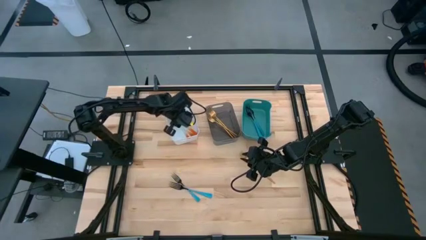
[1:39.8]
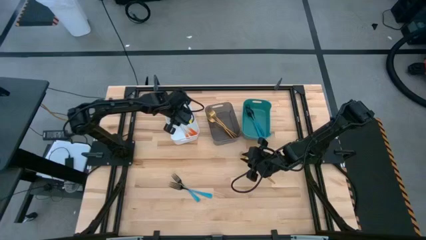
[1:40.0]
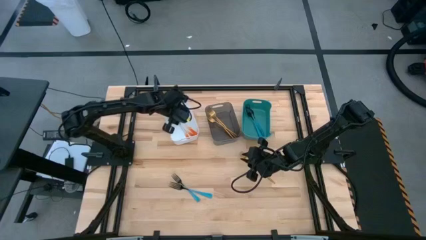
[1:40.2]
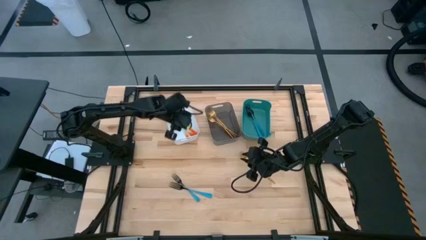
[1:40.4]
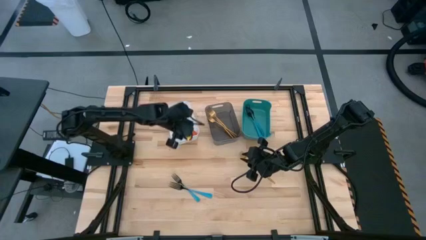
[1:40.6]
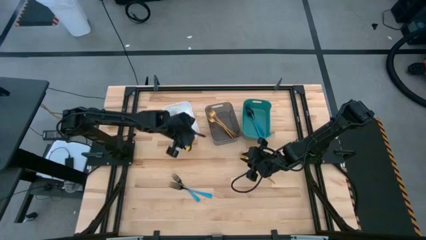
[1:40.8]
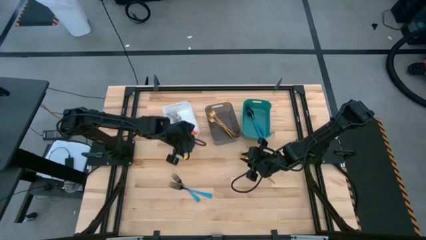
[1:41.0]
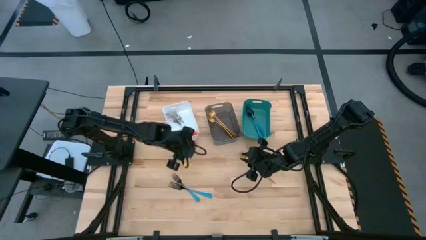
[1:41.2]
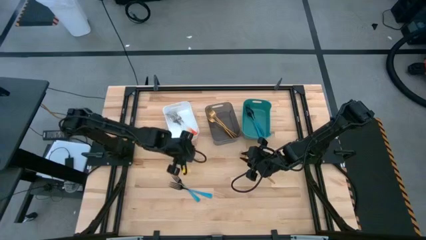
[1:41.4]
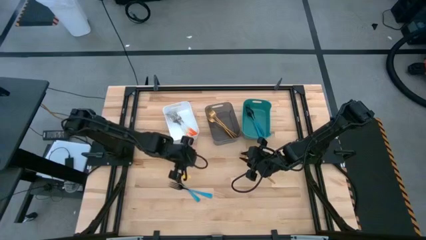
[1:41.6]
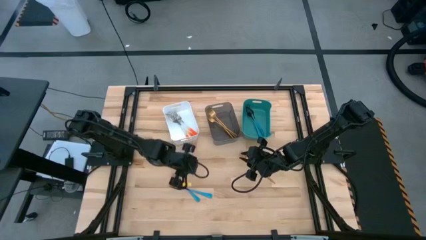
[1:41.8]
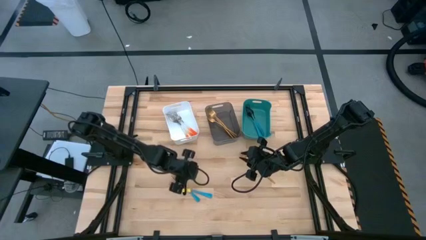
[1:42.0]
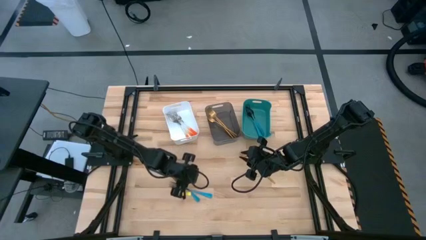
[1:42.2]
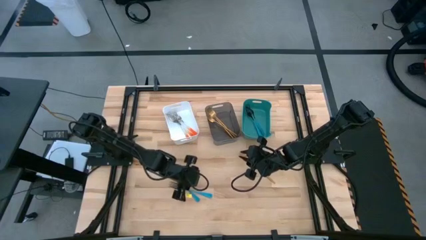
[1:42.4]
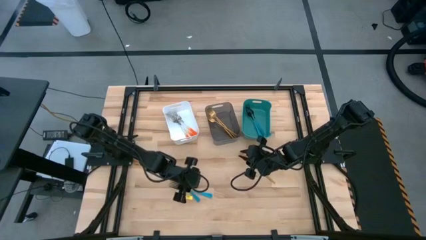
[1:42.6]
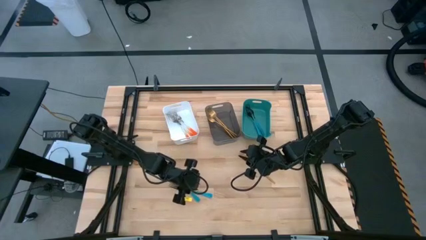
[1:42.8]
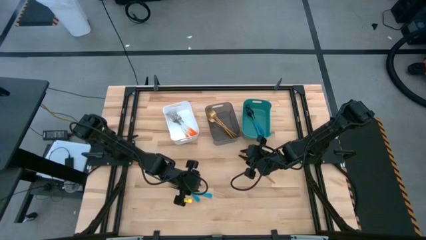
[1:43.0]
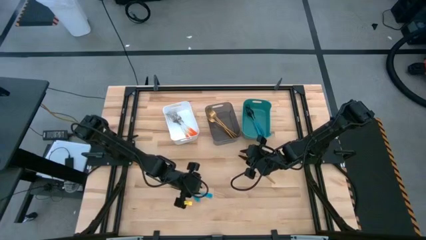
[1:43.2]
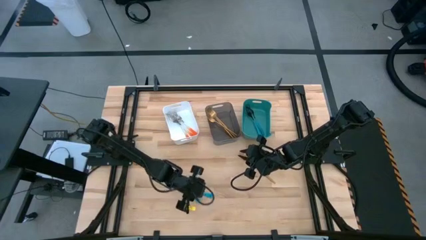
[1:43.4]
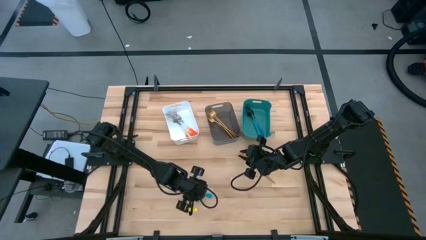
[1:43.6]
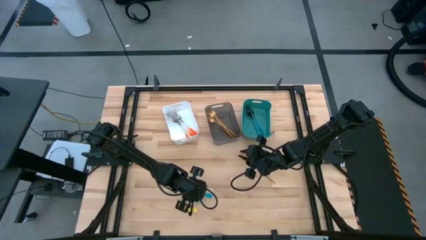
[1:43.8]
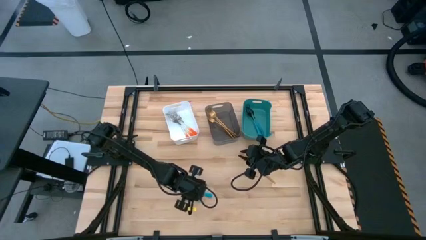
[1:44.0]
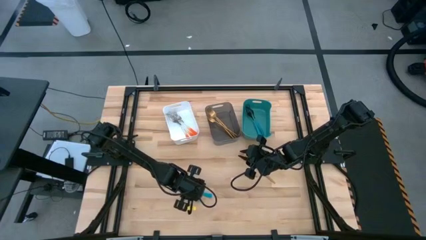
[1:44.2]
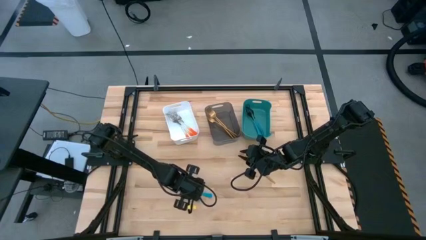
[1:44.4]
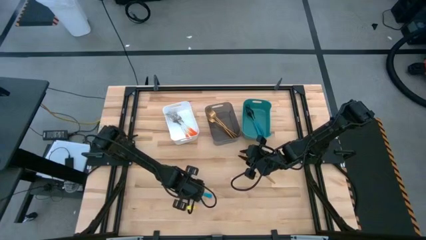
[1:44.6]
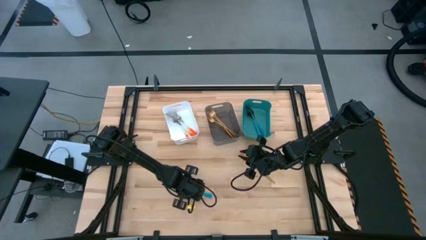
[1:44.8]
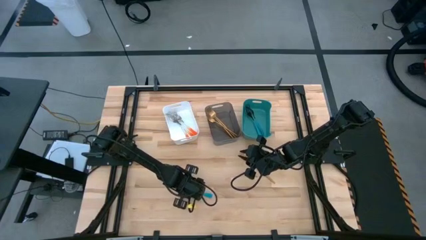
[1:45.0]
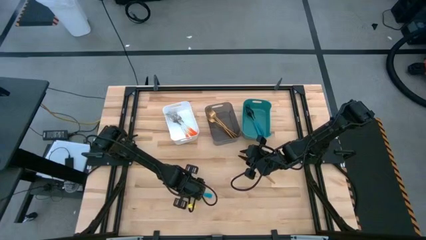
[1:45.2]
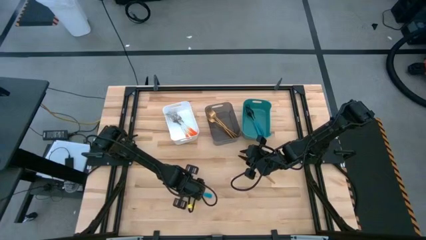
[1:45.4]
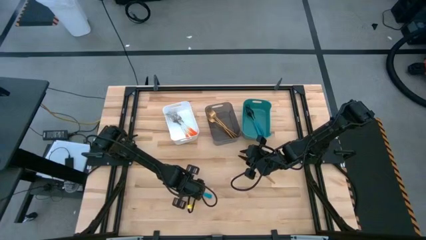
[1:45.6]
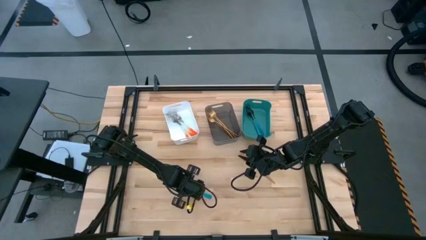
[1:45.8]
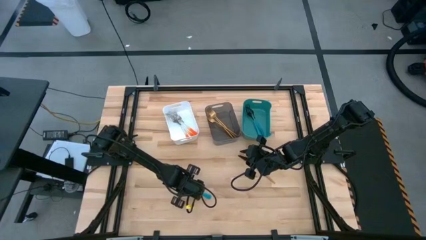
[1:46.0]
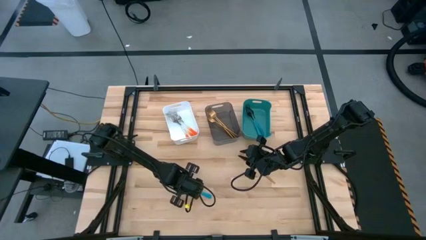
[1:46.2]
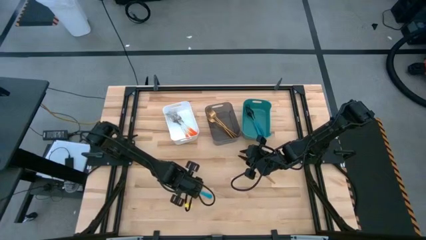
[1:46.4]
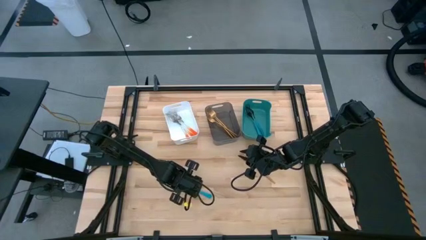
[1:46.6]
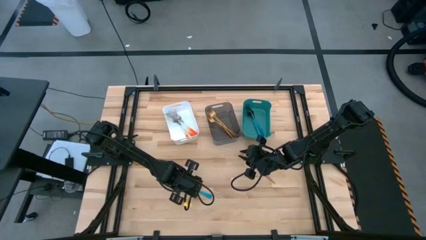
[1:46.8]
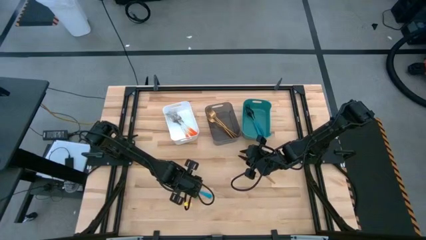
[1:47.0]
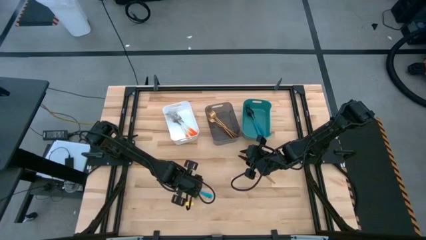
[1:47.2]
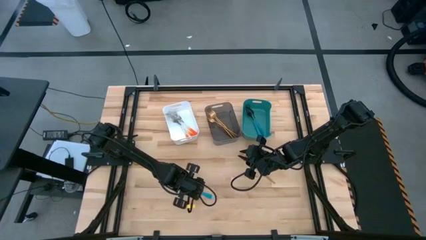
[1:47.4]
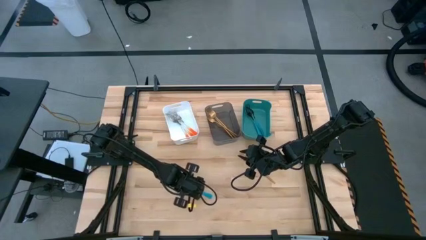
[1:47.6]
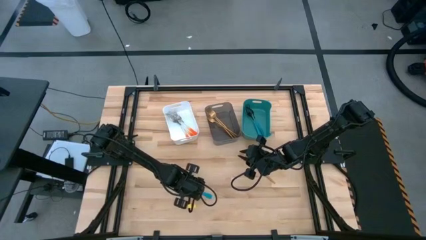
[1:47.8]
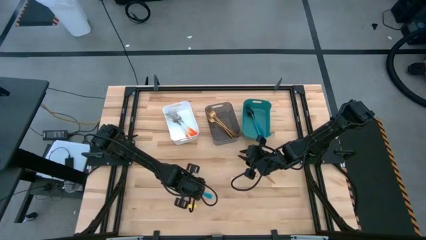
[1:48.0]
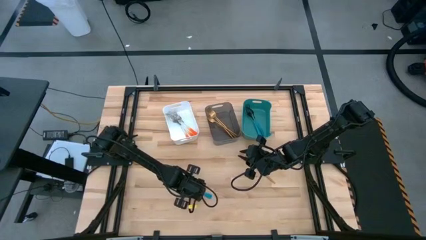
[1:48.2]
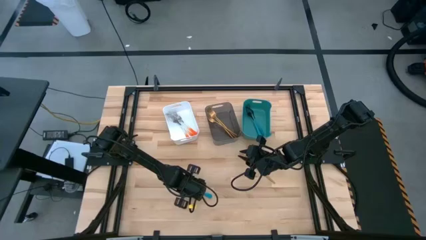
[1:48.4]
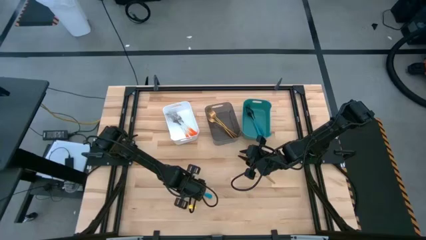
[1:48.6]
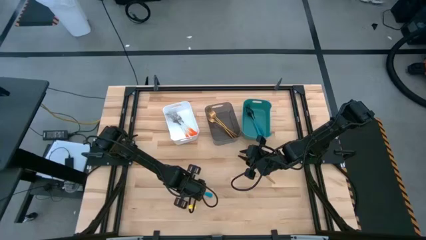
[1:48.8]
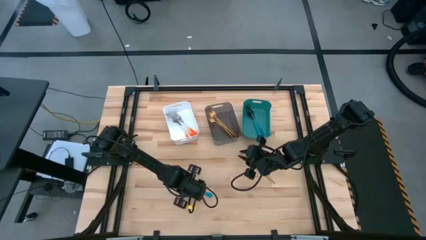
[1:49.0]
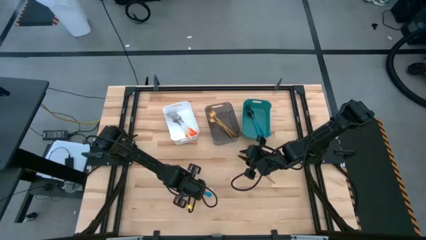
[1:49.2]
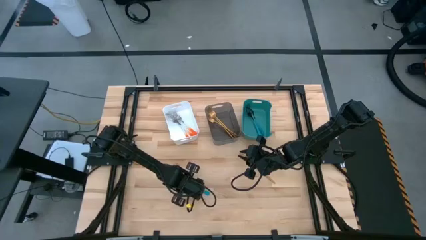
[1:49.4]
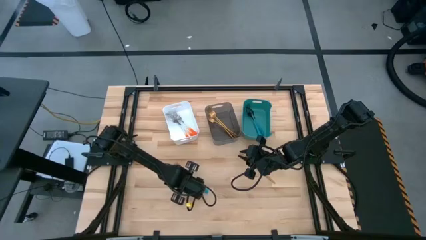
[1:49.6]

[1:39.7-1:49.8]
Task: Sort silverware by color (type)
Put the blue fork into the green bin

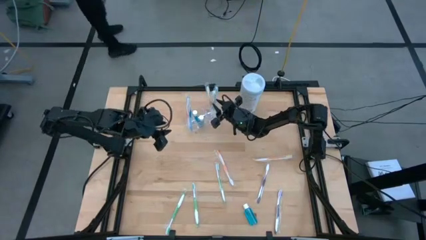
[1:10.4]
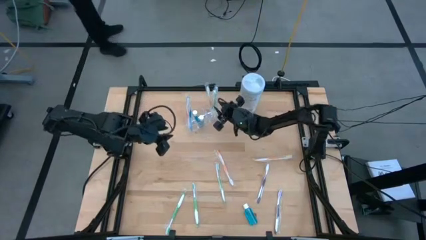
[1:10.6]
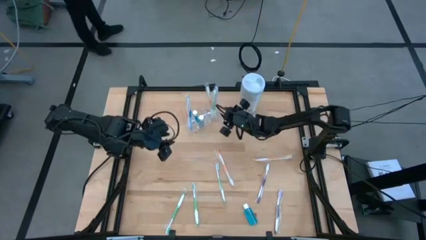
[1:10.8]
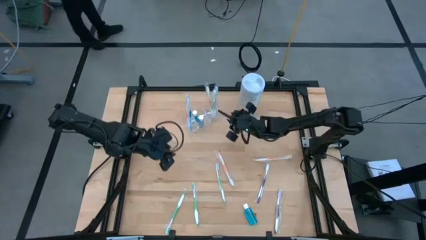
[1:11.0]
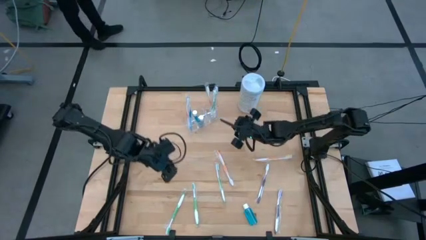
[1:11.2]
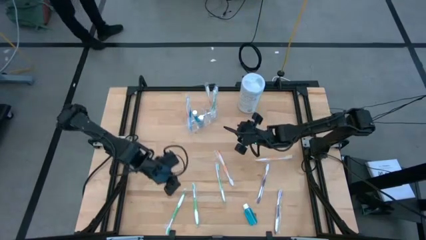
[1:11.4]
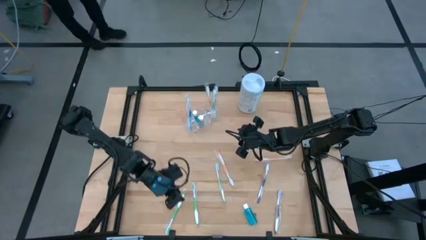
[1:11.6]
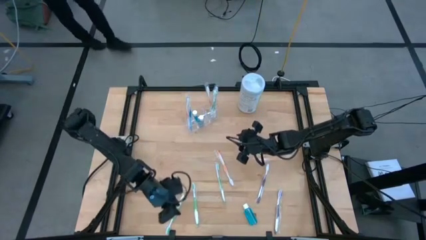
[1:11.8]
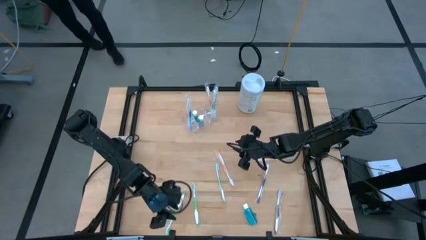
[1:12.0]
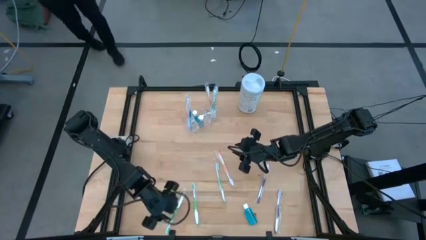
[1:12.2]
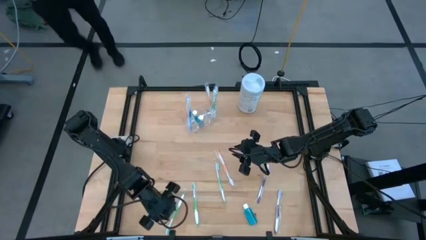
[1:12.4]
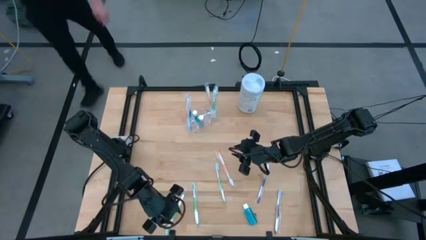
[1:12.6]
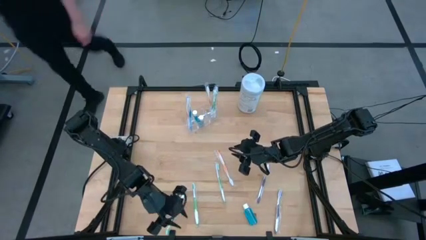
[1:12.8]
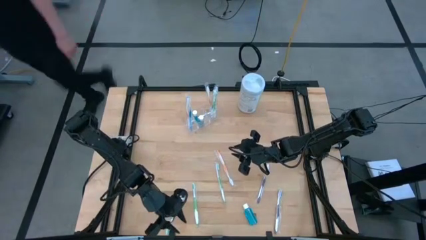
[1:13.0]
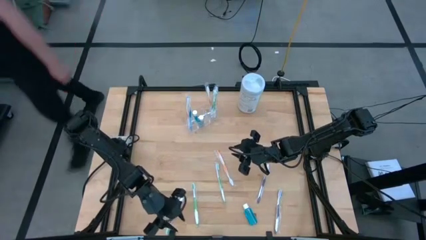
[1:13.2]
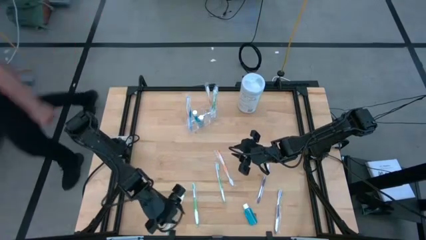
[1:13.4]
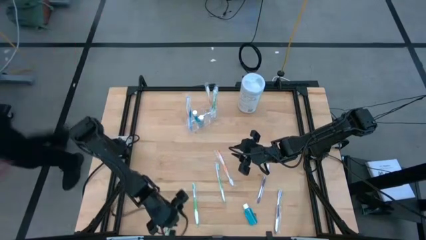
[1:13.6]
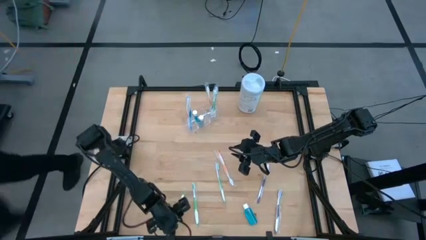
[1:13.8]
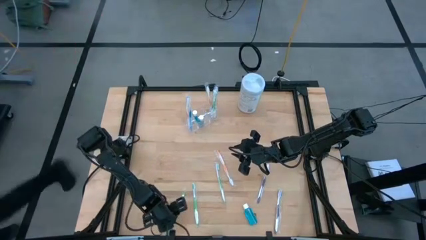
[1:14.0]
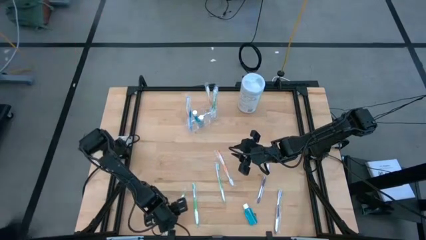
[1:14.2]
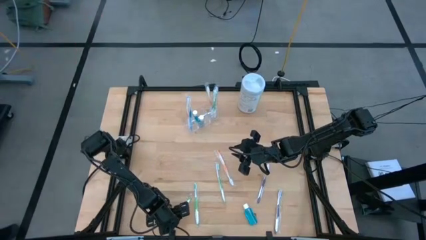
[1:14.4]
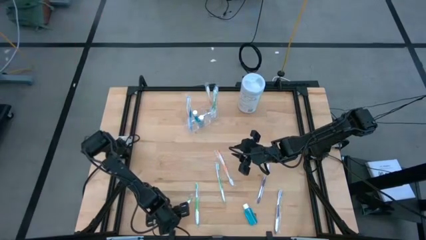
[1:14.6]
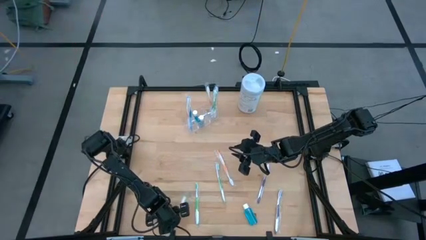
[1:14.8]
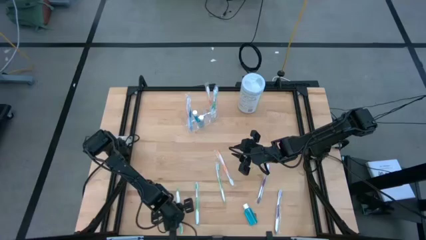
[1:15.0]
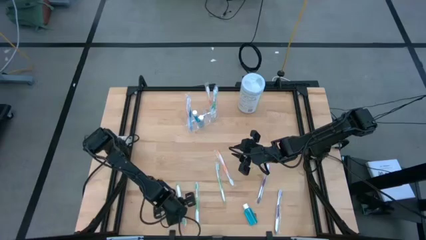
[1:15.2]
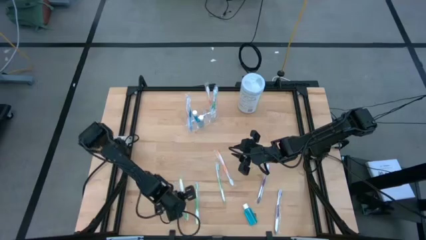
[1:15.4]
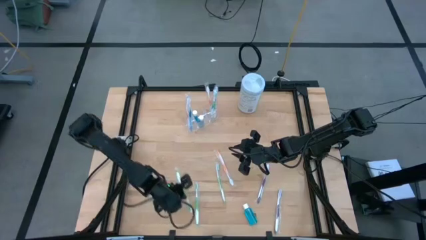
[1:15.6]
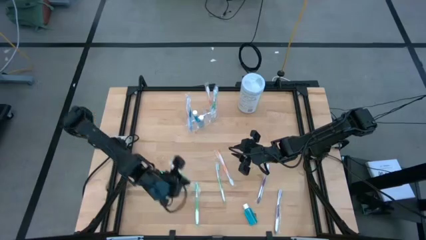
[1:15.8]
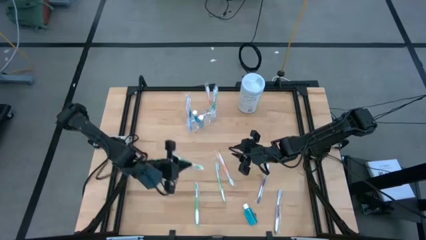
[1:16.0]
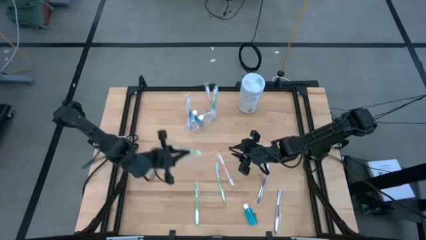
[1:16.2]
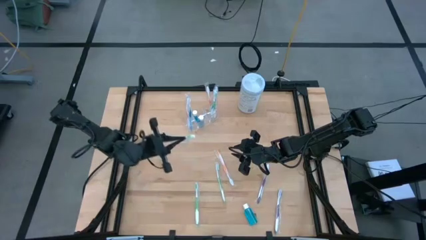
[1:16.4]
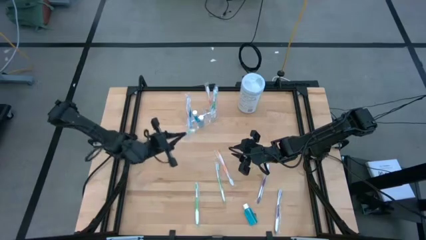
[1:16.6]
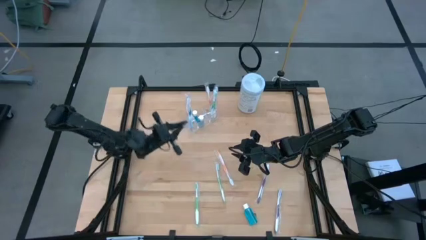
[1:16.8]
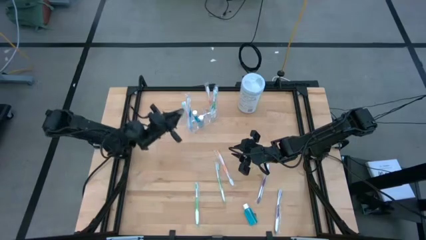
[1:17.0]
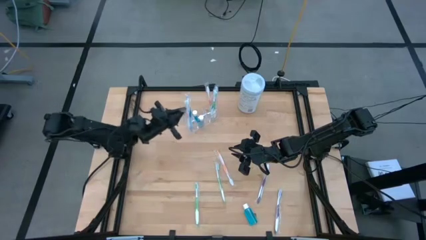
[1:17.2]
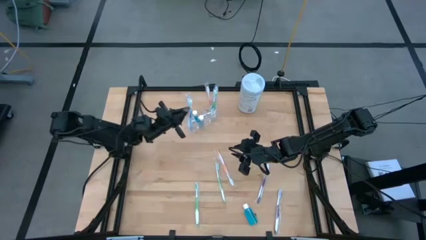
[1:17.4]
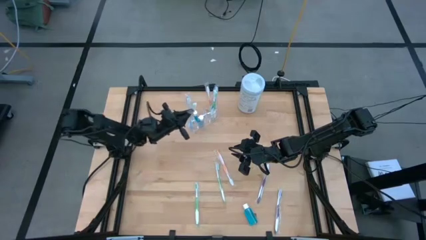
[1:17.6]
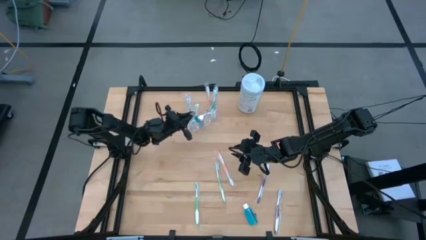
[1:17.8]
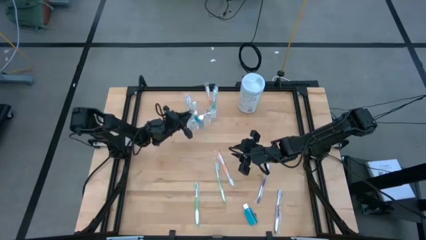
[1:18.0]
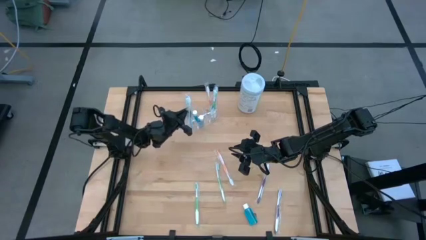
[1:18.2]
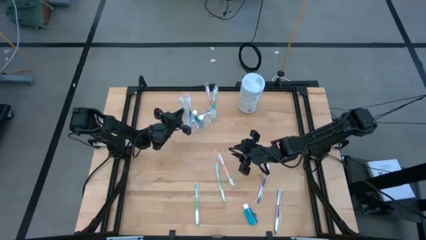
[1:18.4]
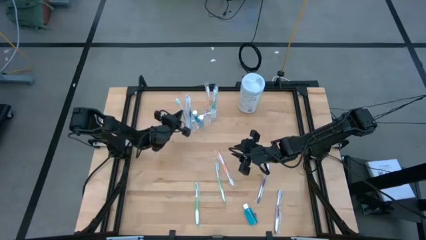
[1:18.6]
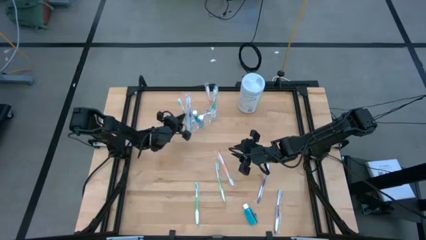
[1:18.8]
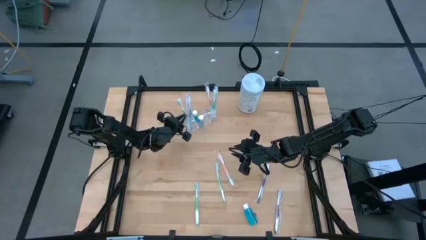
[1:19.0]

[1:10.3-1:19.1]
Task: Pick & Place toothbrushing station
Put the green toothbrush into the transparent organizer
